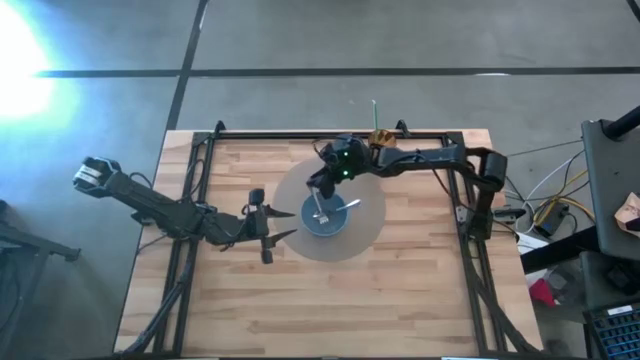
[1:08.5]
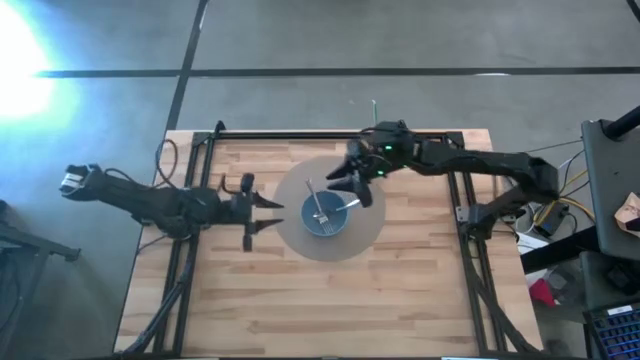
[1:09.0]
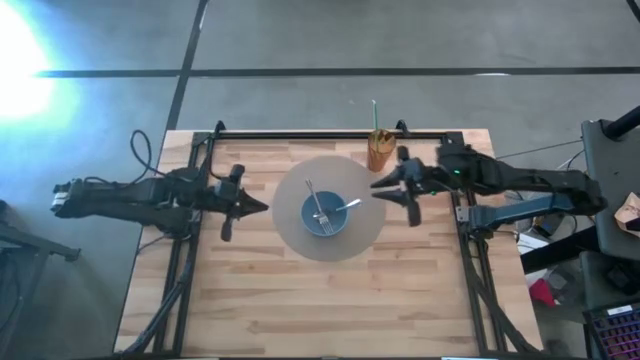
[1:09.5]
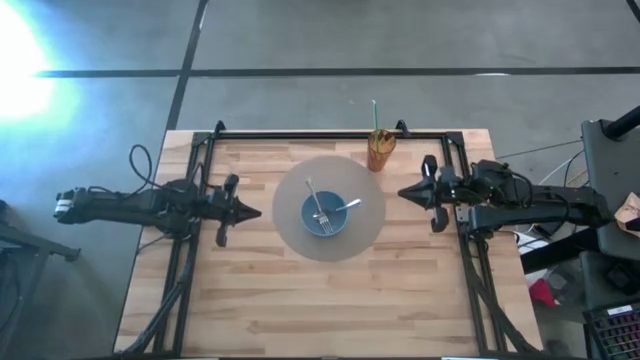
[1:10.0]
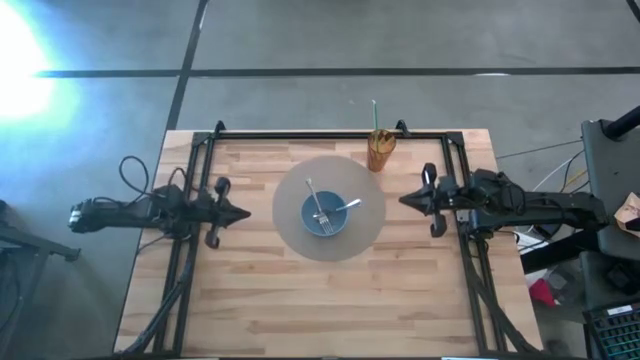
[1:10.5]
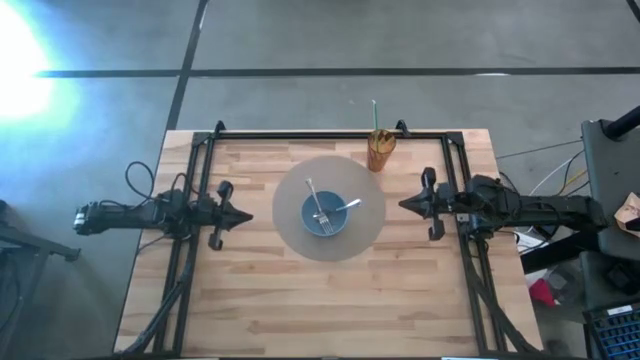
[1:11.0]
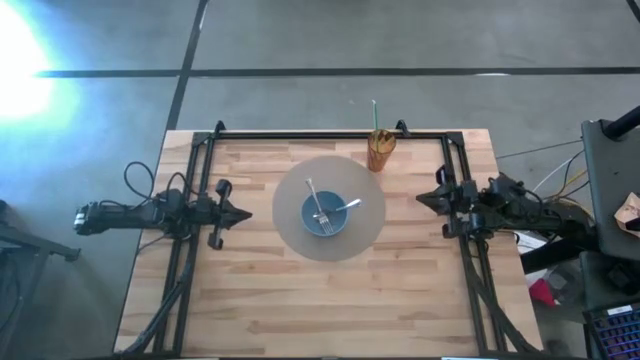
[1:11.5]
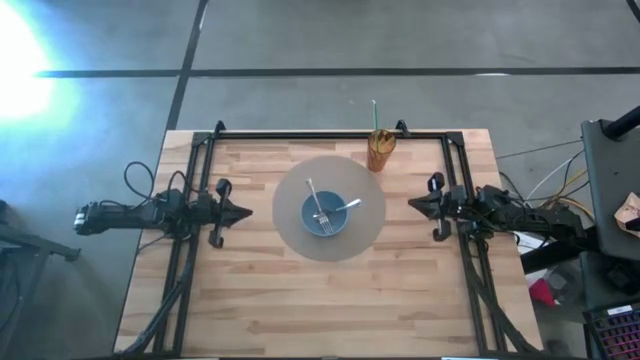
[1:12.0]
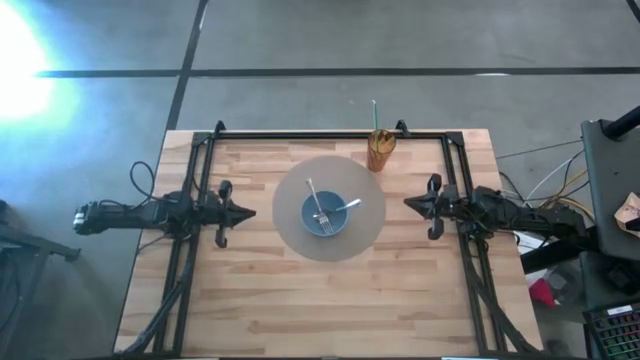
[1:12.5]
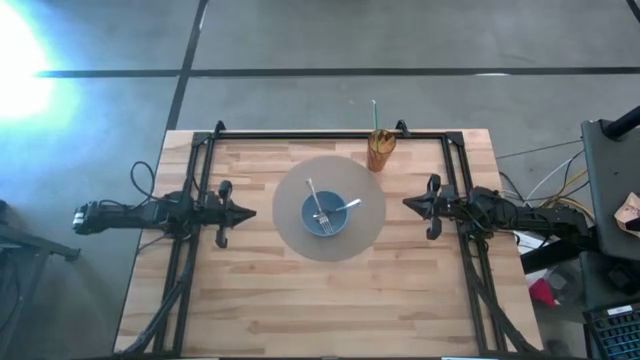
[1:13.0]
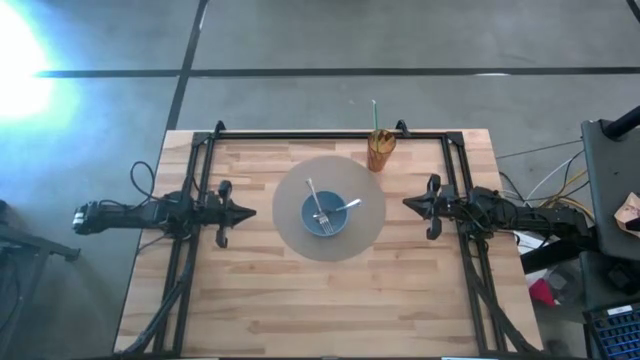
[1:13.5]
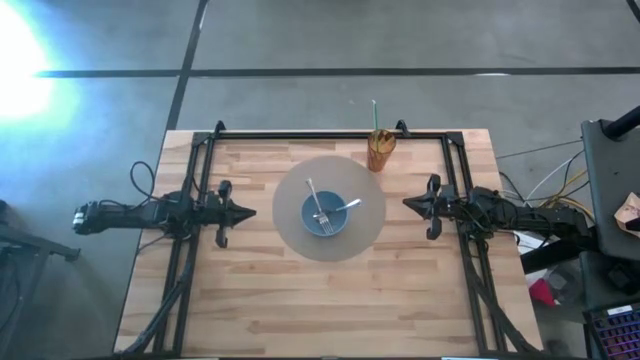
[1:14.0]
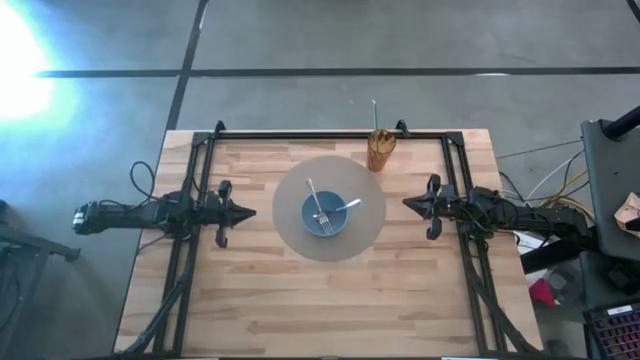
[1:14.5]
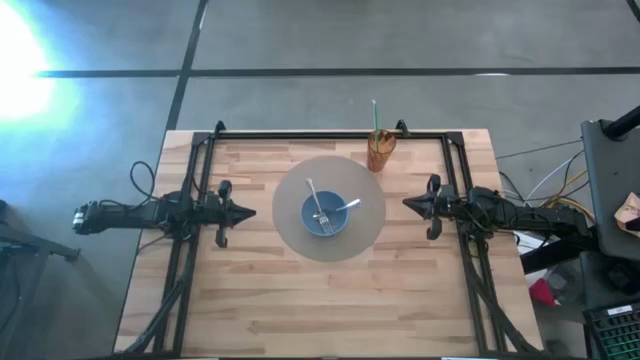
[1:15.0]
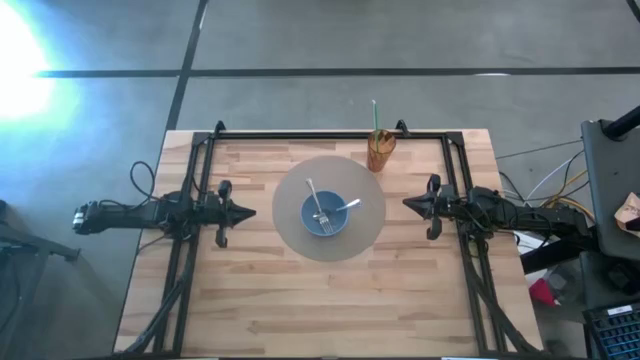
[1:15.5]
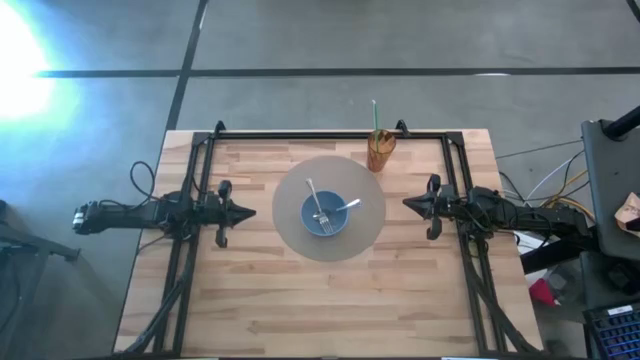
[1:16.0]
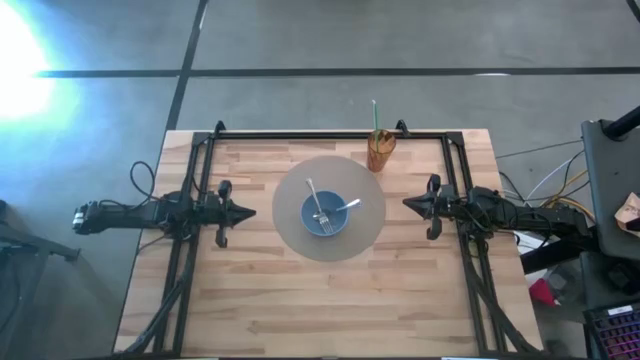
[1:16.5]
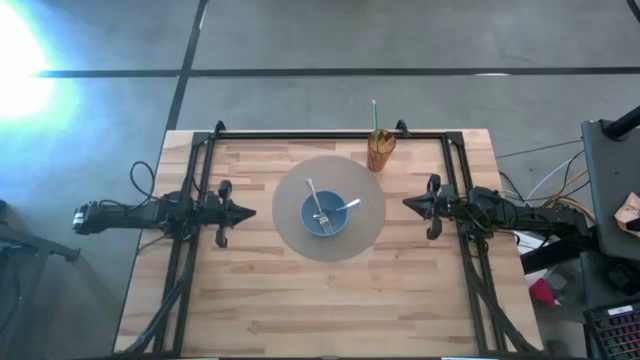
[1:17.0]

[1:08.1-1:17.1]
Task: Pick & Place Utensil
Return to Home Position
